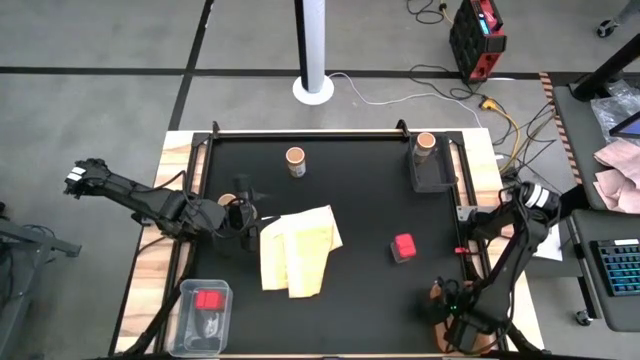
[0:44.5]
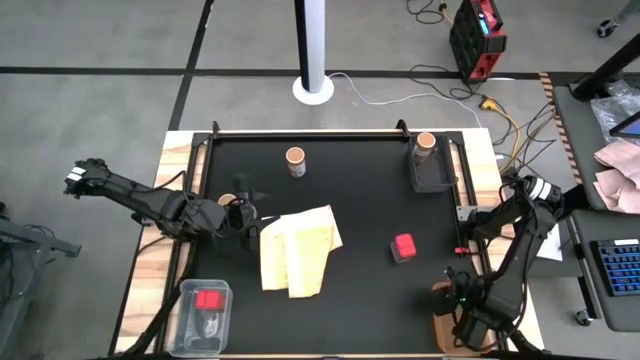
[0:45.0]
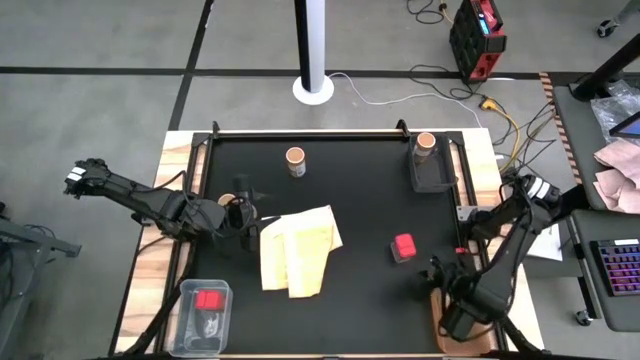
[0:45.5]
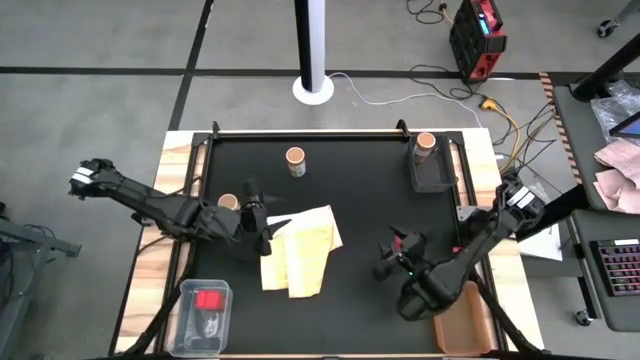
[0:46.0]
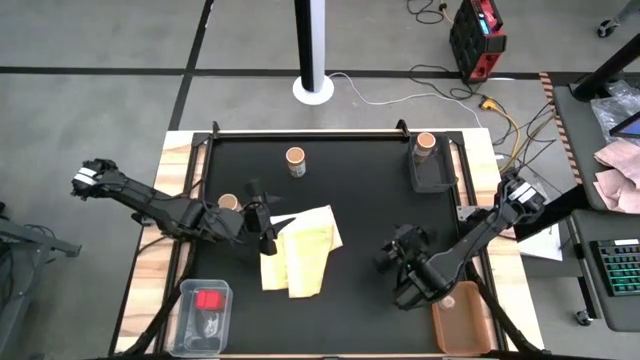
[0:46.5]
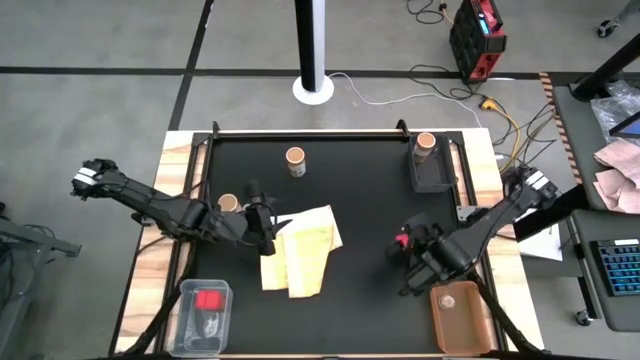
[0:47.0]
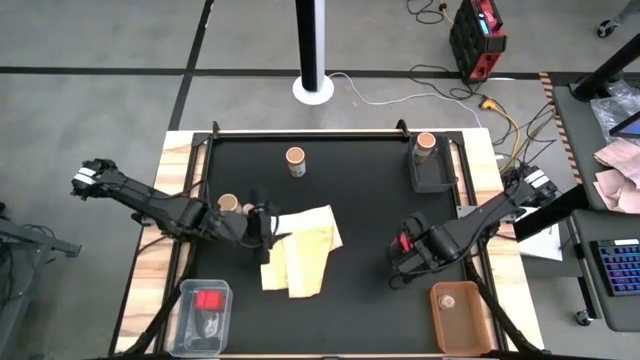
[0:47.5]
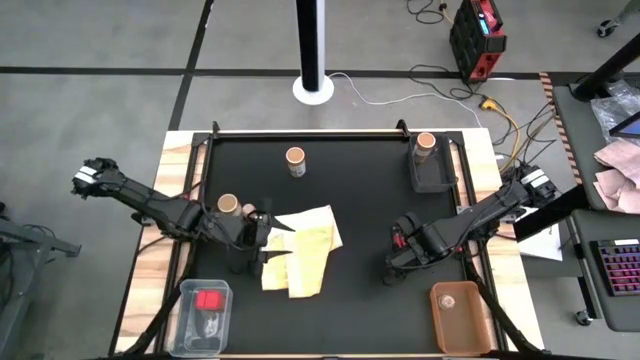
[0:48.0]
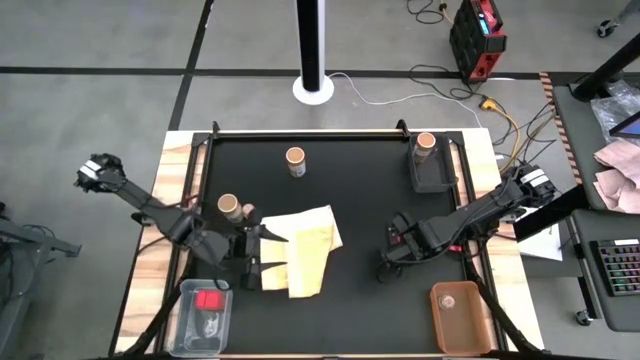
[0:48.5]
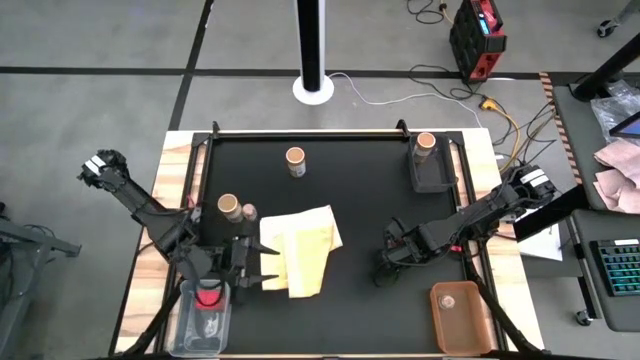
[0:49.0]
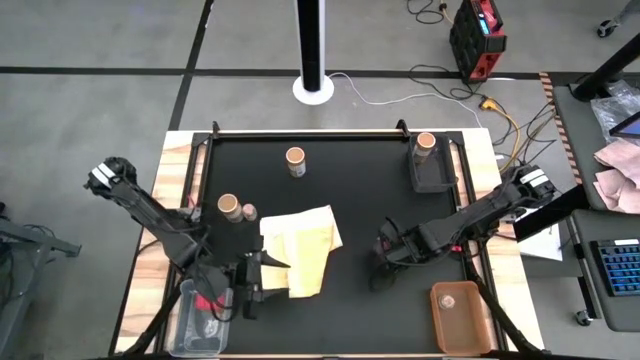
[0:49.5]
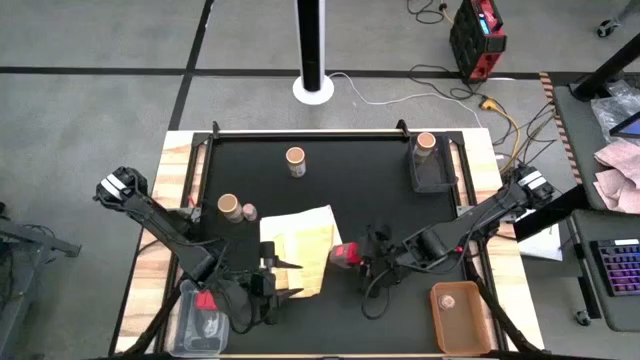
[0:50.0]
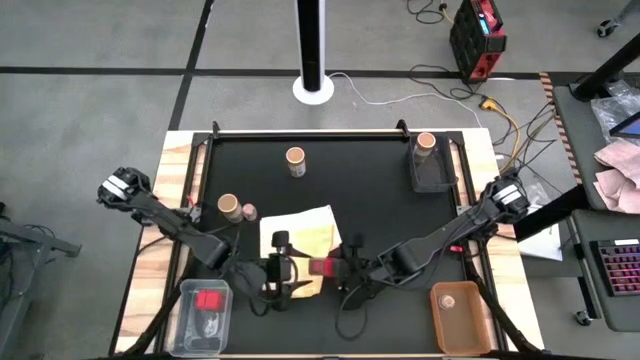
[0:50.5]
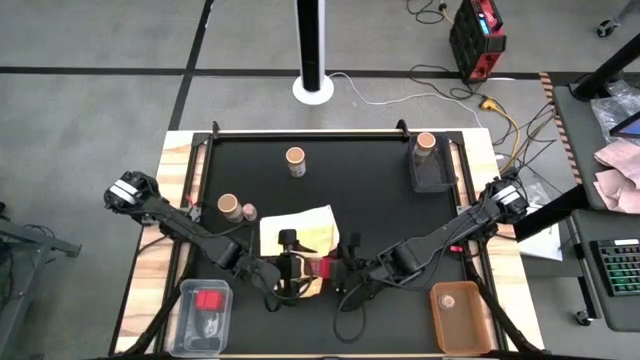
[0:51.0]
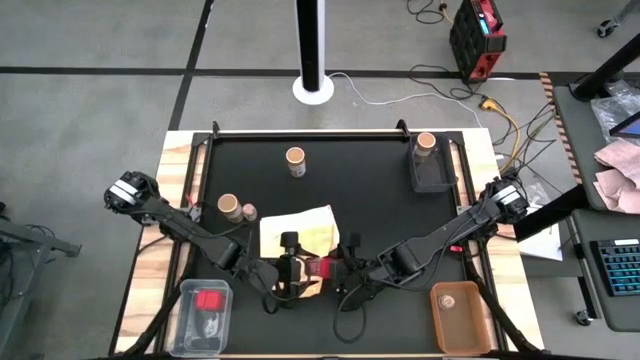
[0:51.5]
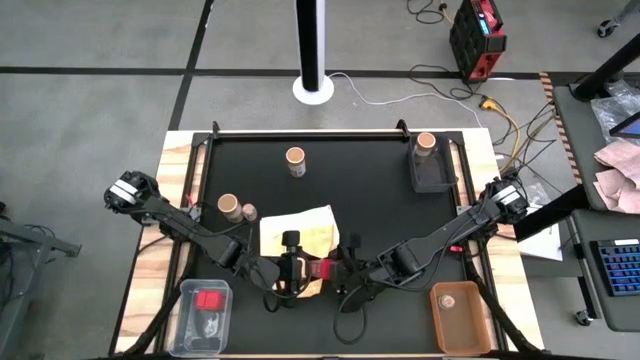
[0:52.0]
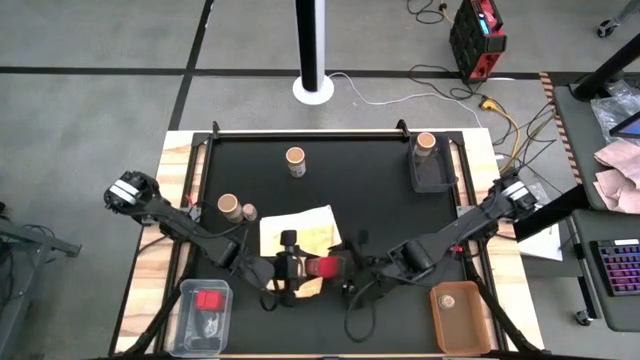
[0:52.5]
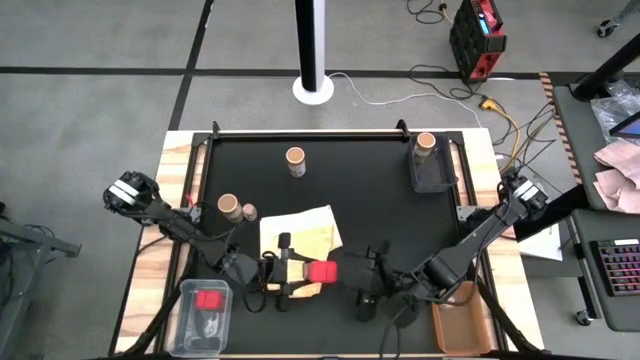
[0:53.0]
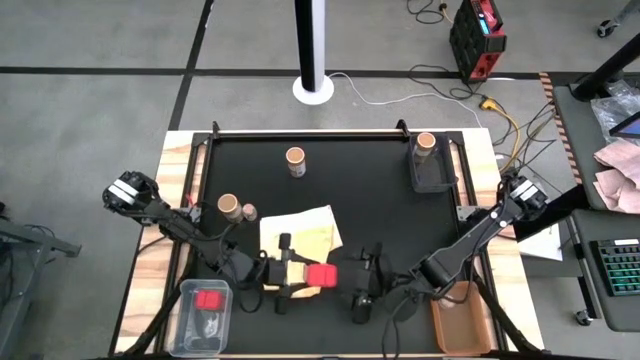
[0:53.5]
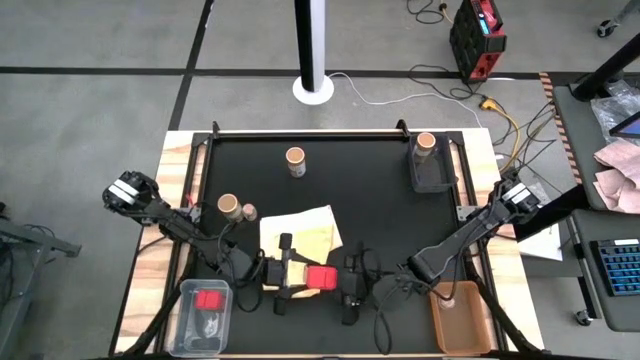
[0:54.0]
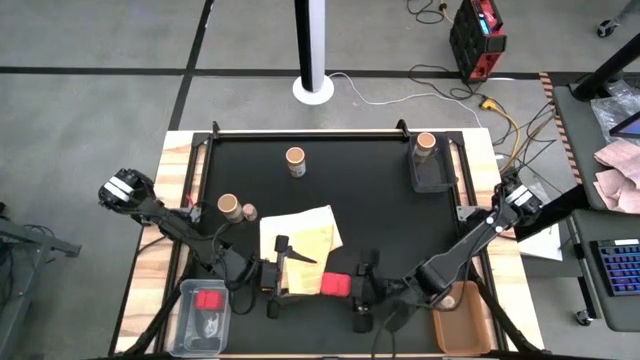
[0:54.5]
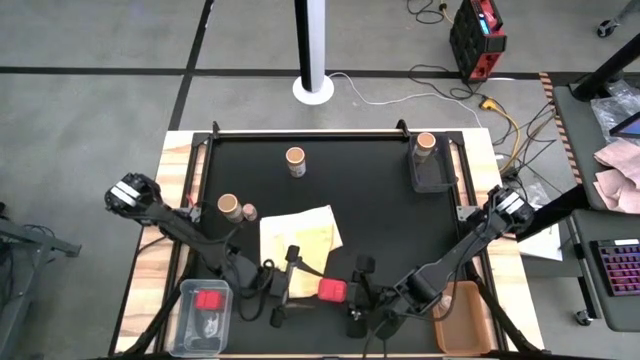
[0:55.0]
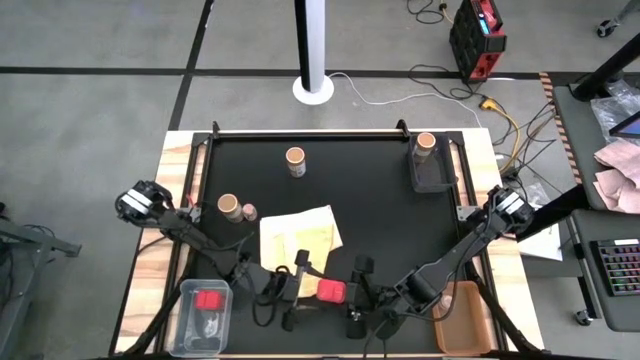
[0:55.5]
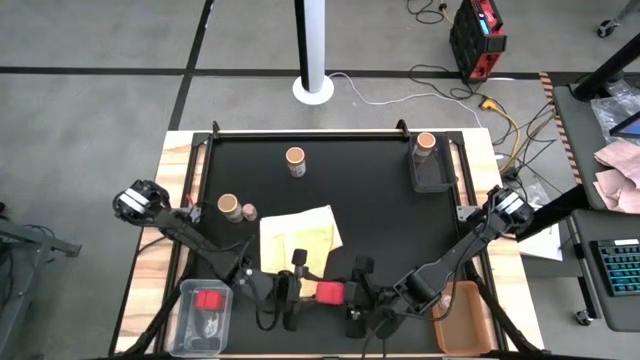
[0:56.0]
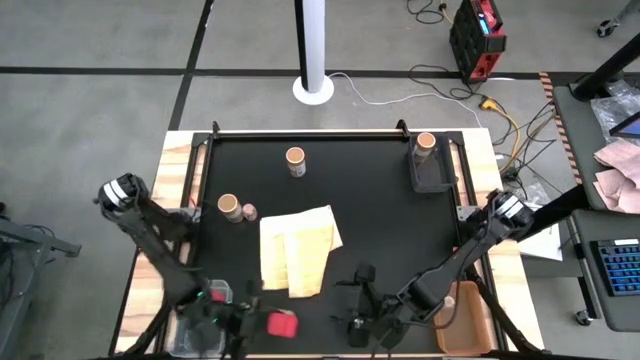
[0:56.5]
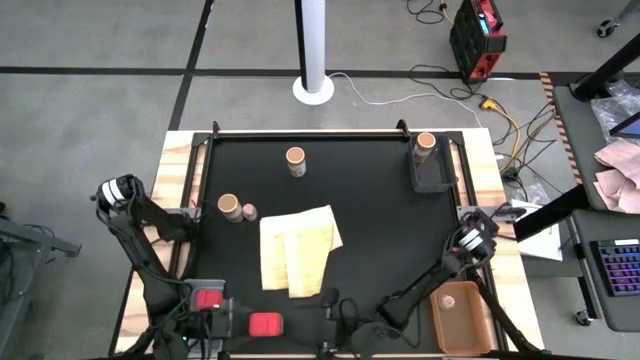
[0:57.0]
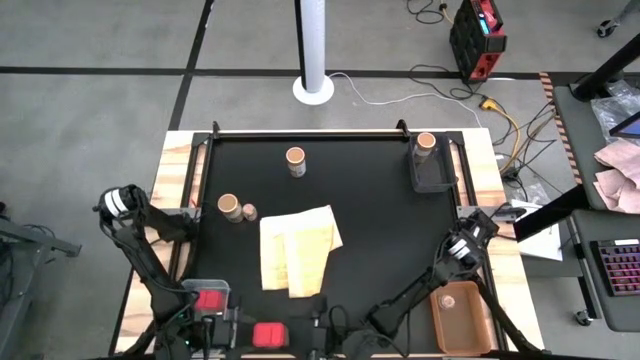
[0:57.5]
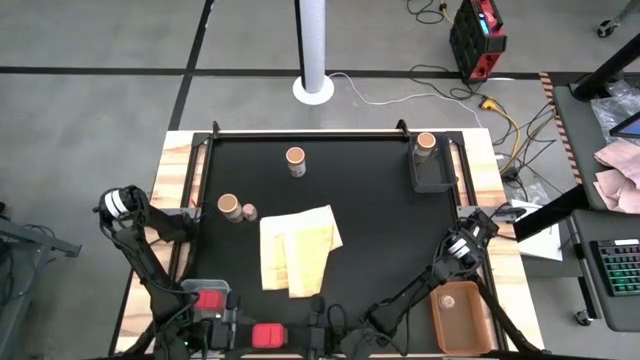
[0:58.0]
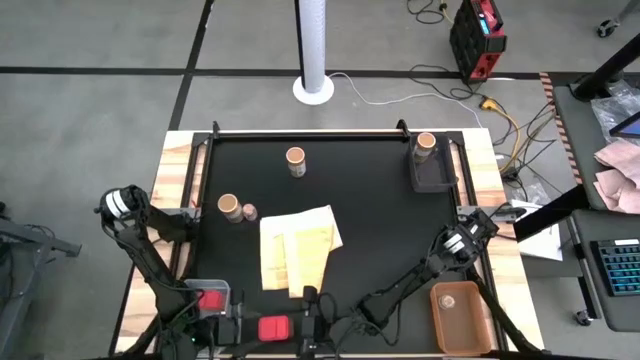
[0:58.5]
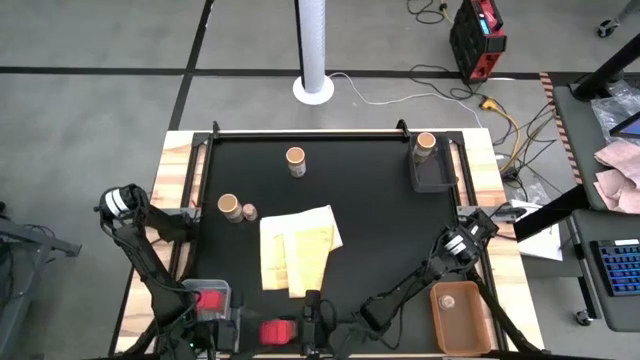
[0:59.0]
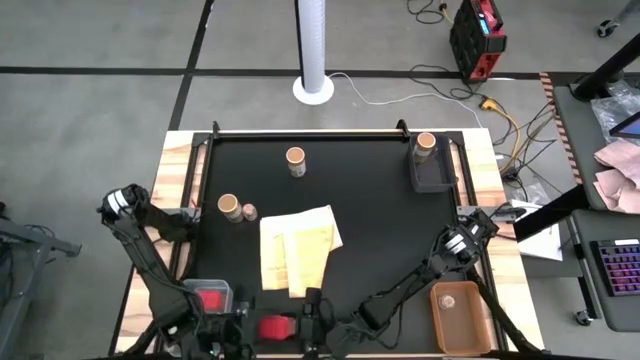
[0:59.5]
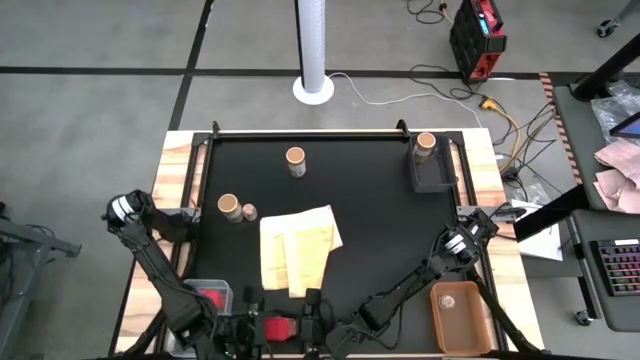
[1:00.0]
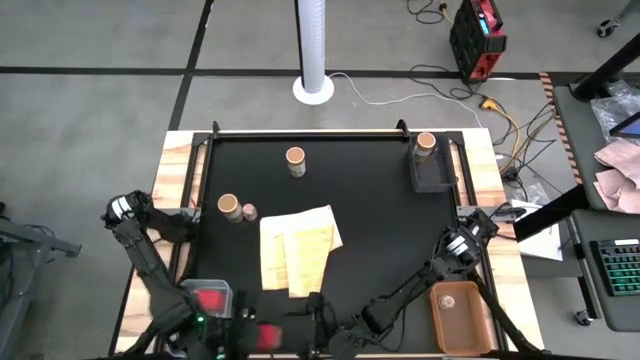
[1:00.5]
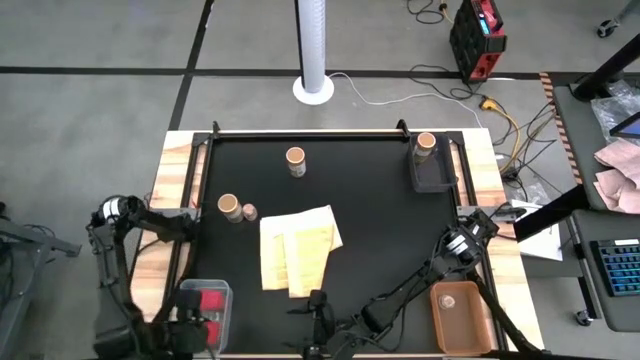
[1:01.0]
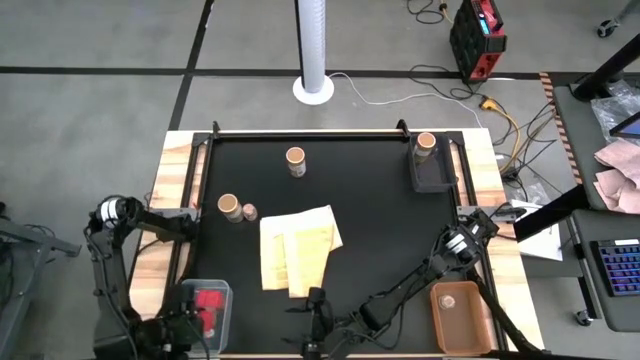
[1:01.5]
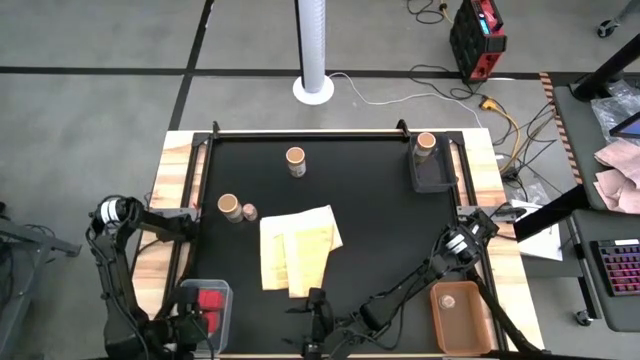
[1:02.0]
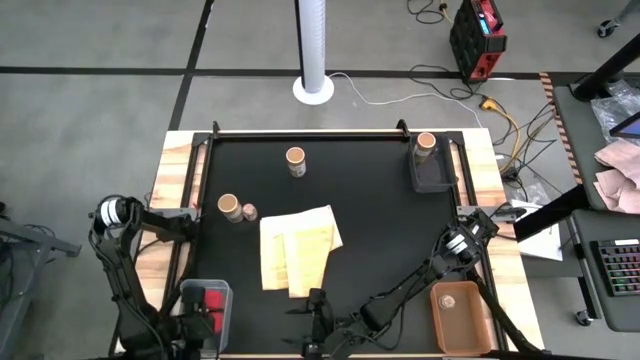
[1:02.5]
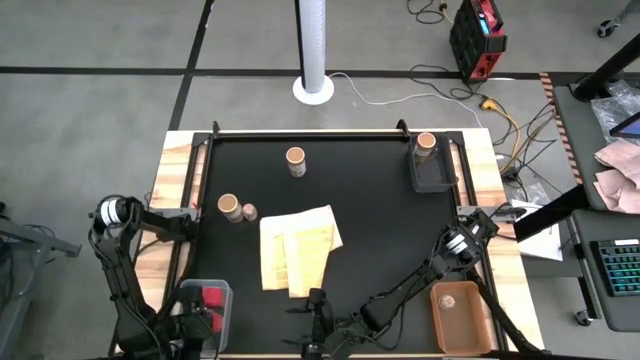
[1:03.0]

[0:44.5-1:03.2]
Task: Sort spices by type
Put the red spice can into the transparent bin

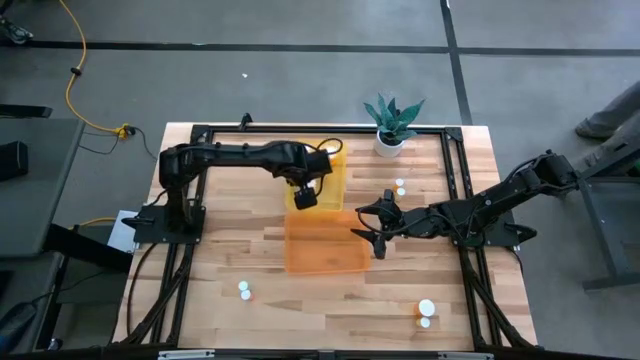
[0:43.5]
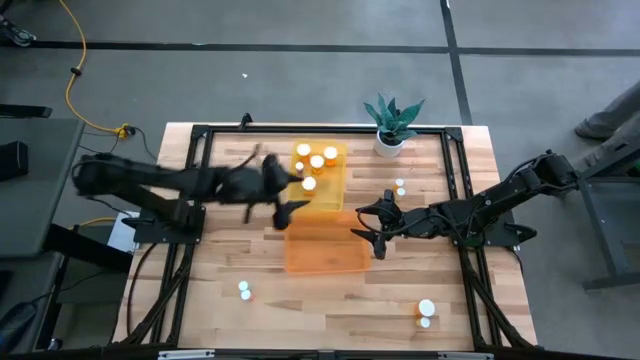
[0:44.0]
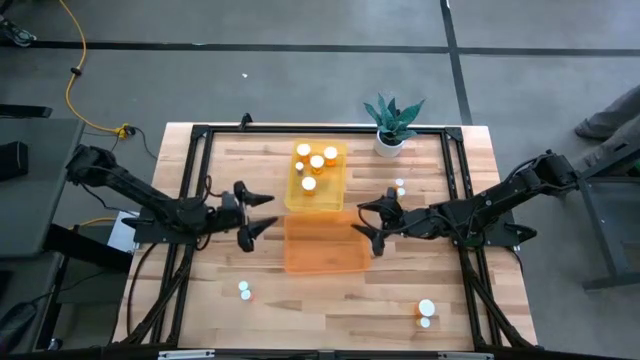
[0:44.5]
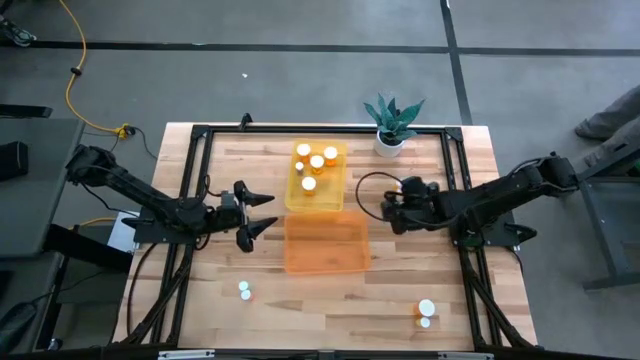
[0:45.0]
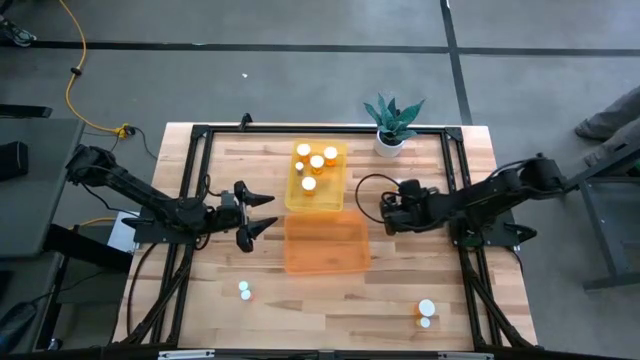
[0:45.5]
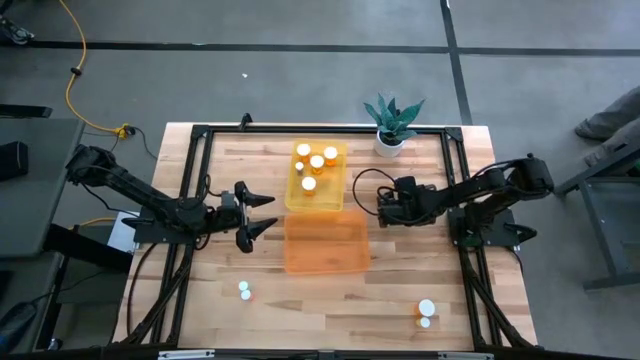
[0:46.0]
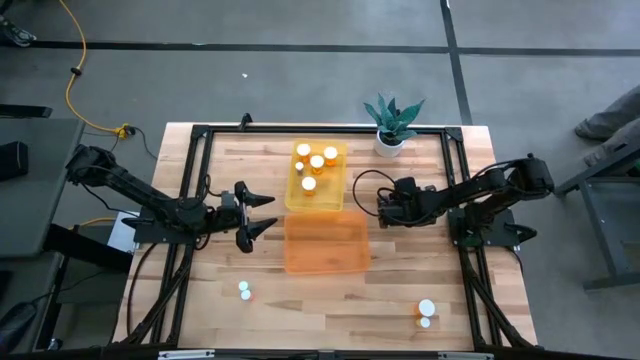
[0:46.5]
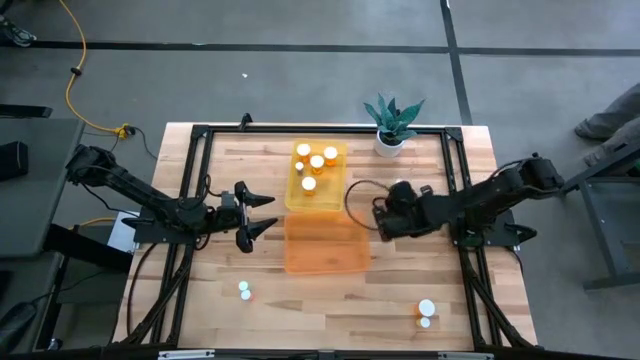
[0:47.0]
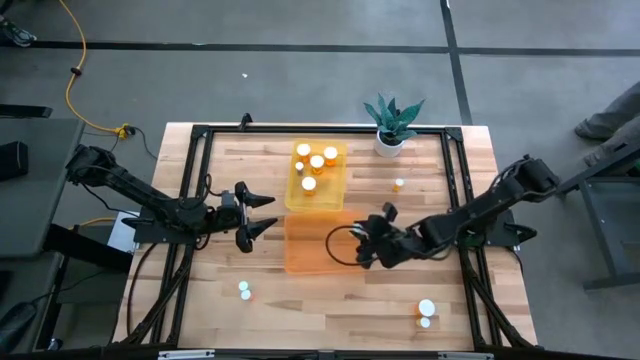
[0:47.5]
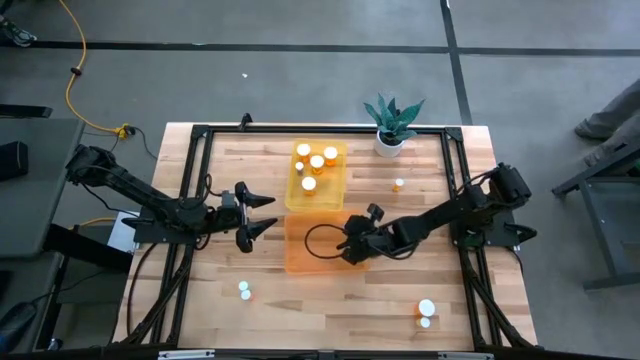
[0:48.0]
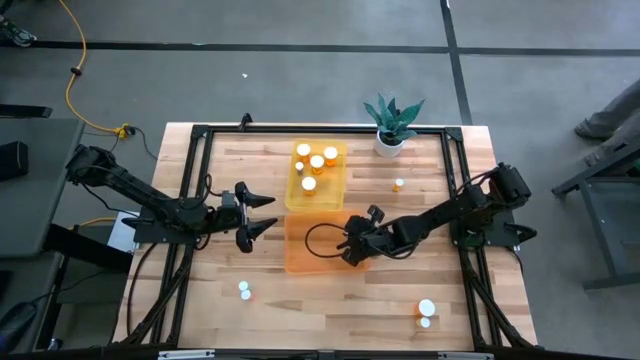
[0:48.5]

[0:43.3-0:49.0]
Task: Pick and place medicine bottles into bin by pill shape (circle, oval)
Put the yellow tablet bottle into the orange bin
